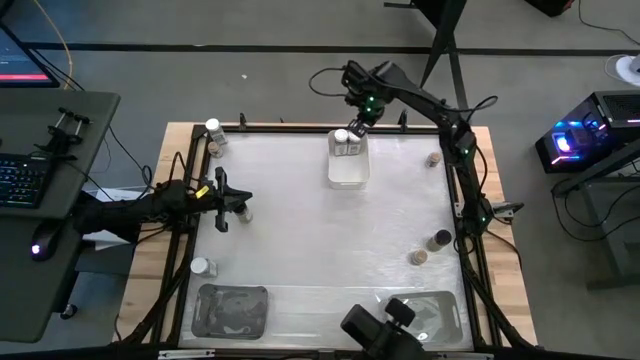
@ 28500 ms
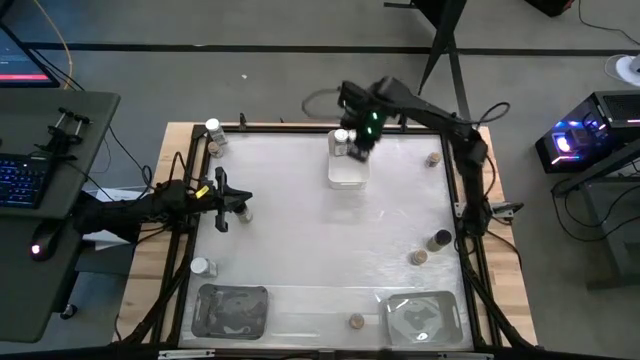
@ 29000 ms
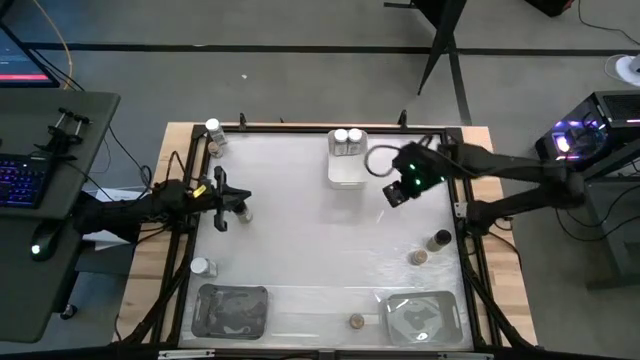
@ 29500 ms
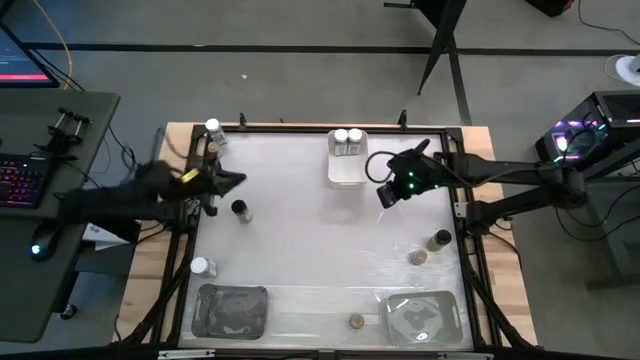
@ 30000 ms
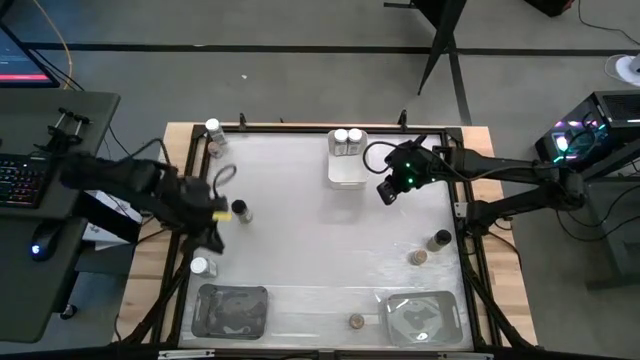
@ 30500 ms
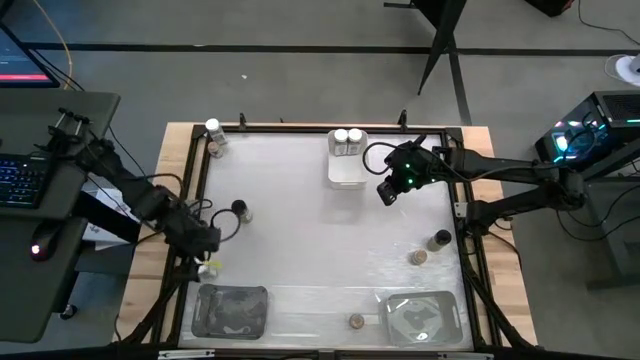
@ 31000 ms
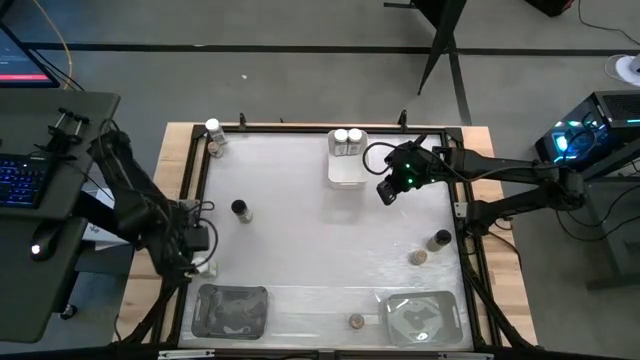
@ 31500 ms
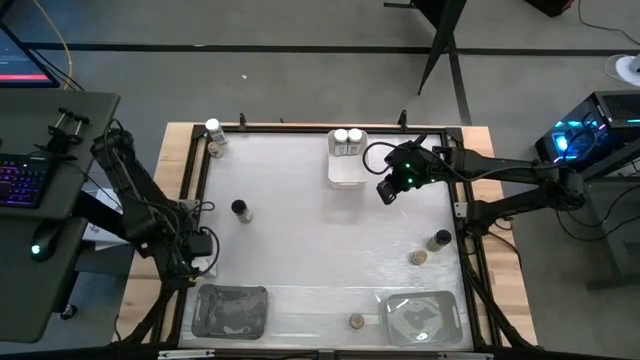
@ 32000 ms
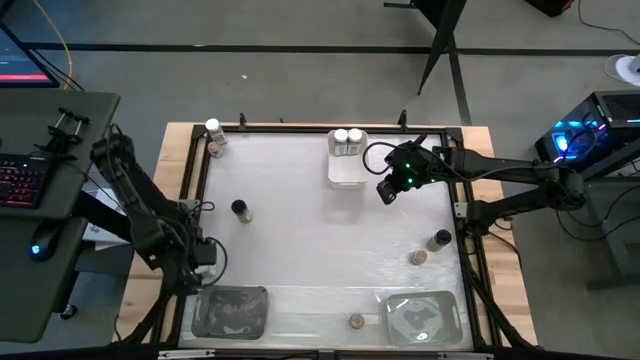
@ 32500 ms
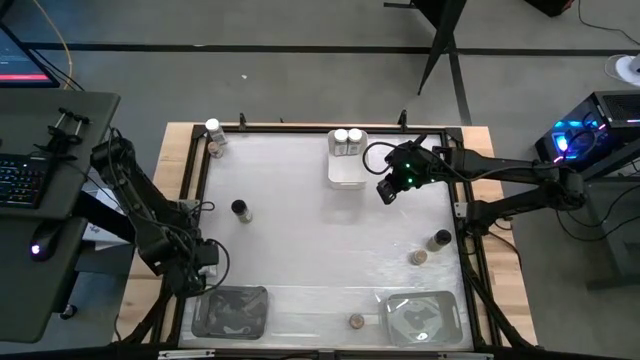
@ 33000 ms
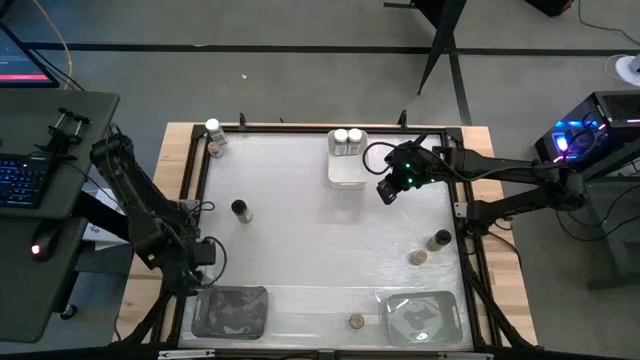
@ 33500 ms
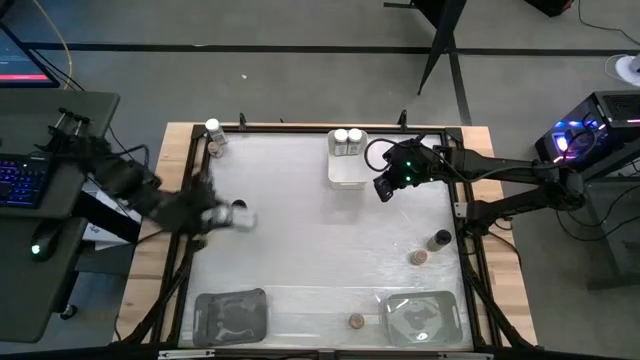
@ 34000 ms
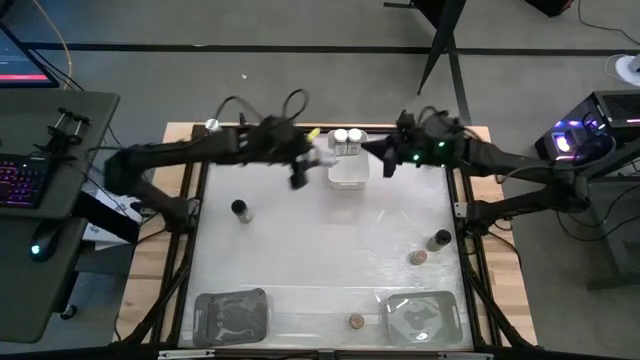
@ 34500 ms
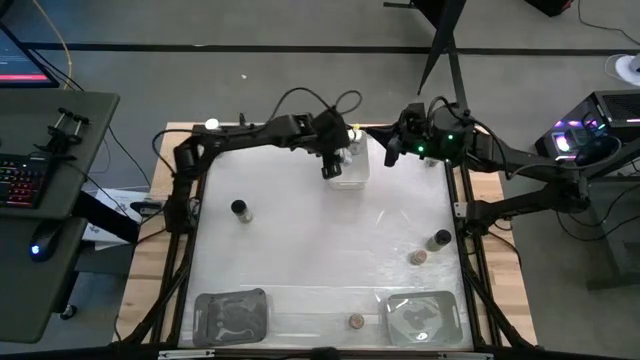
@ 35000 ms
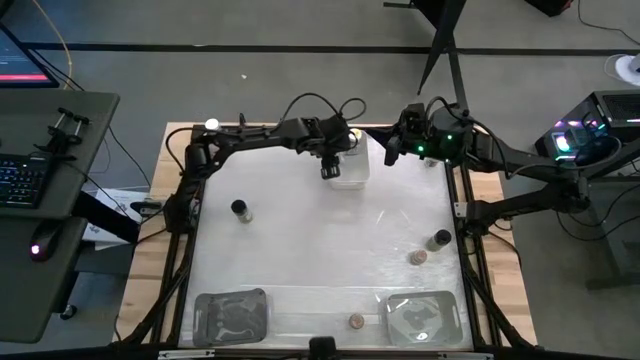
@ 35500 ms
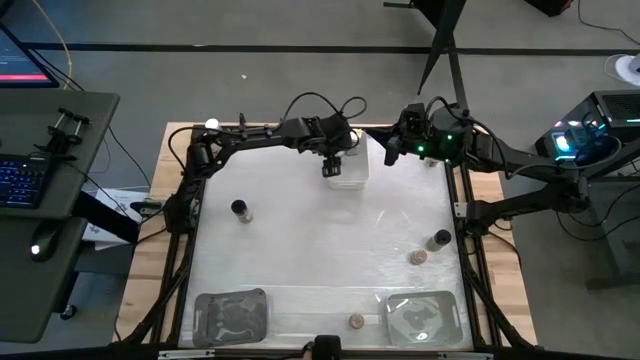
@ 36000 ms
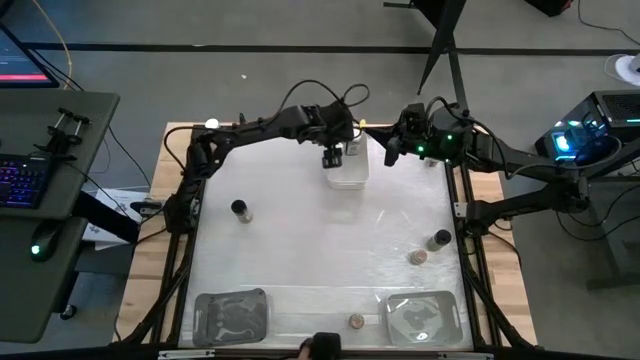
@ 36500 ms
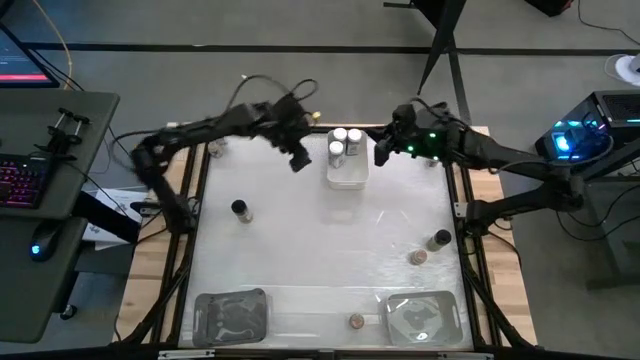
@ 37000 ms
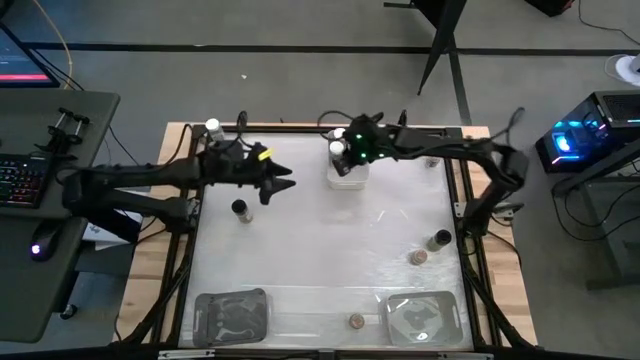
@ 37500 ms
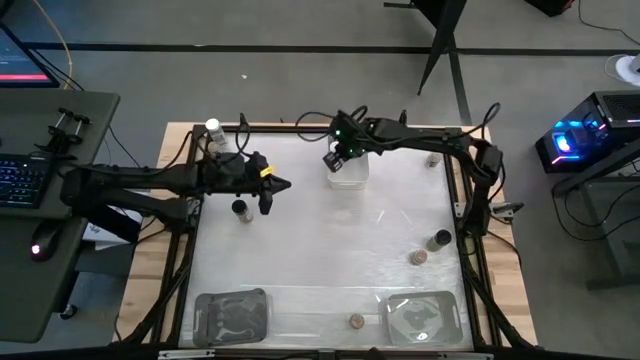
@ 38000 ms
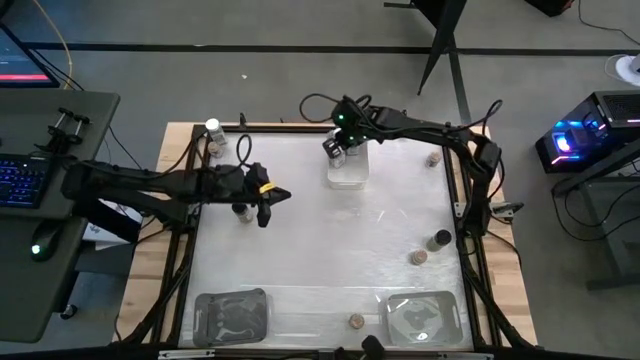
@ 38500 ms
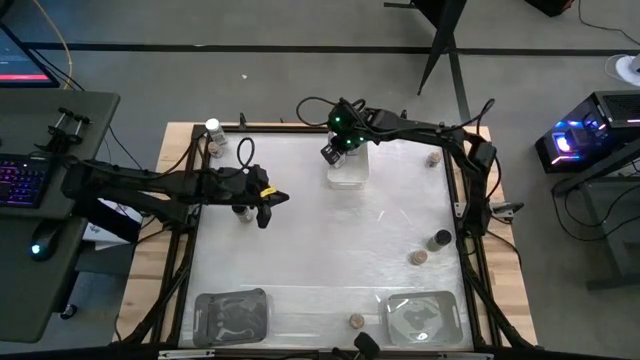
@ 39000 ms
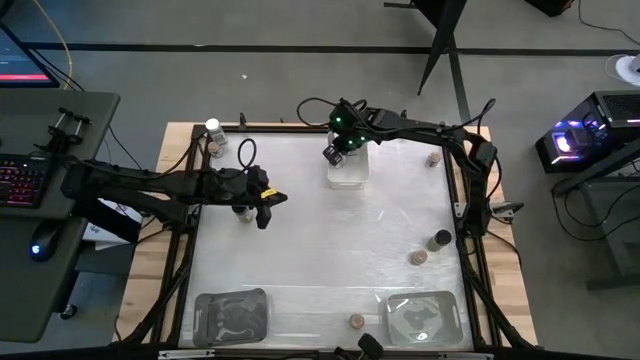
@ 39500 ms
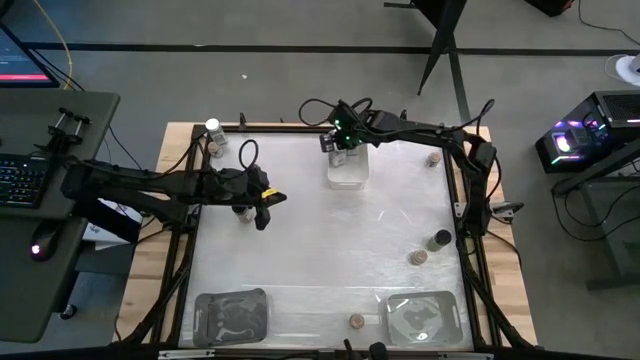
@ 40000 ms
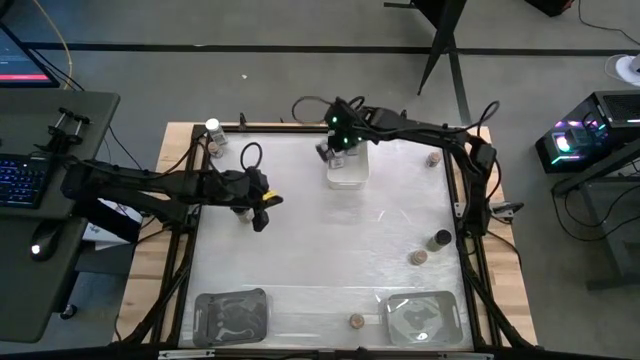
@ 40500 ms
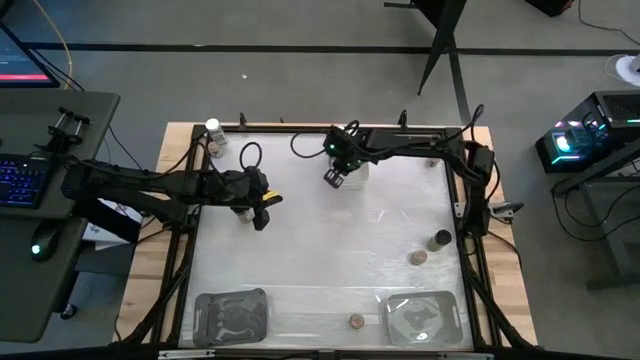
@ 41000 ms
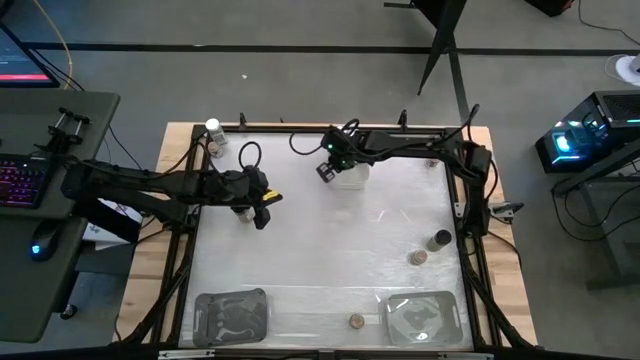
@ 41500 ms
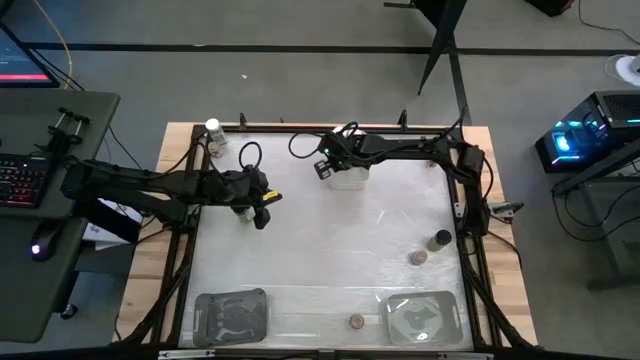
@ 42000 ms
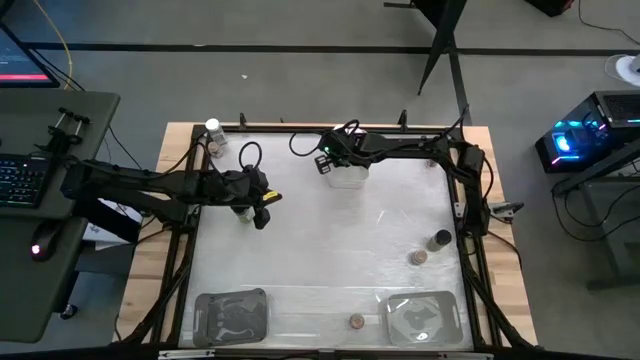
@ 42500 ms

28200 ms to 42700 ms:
Task: Sort spices by type
Put the bottom white seasoning bottle into the white bin

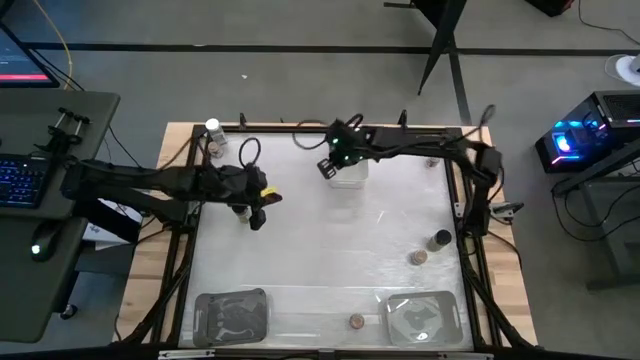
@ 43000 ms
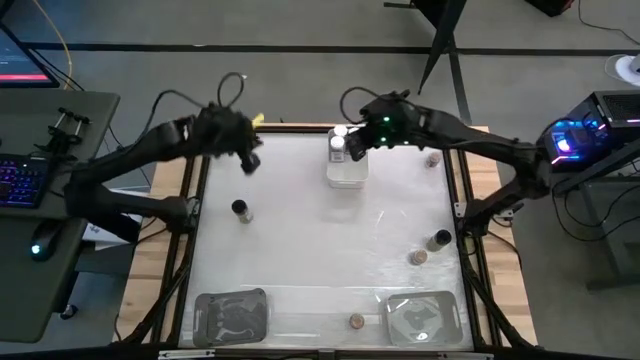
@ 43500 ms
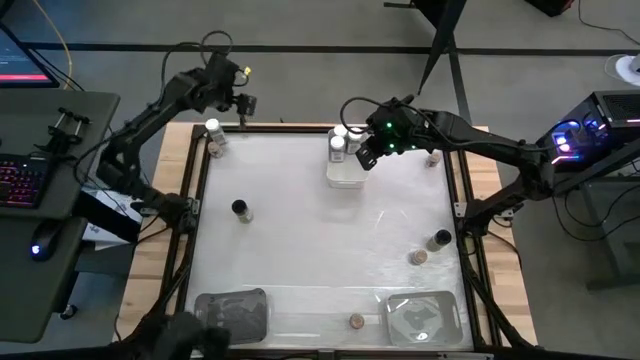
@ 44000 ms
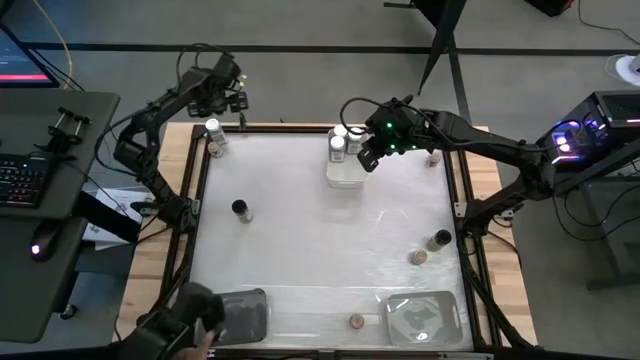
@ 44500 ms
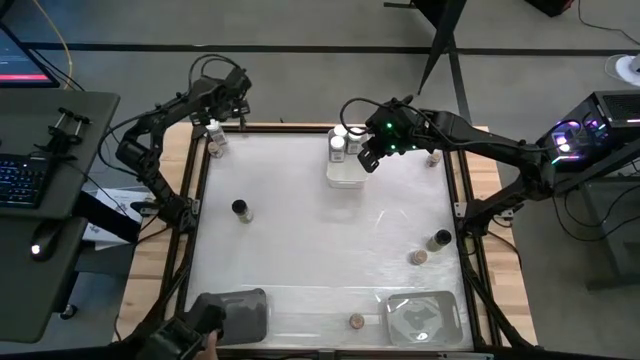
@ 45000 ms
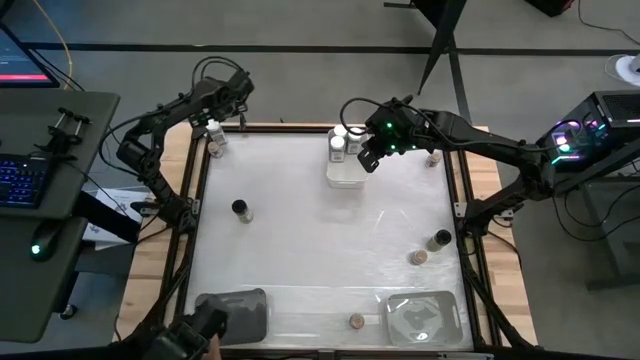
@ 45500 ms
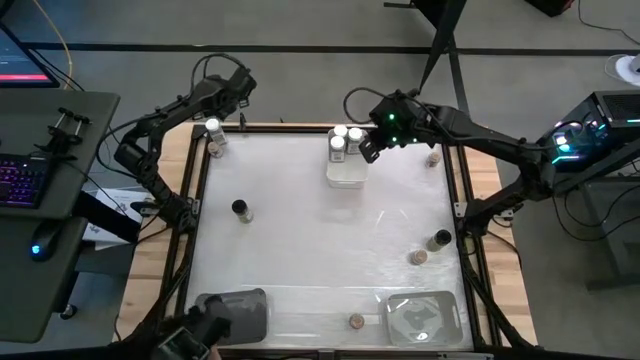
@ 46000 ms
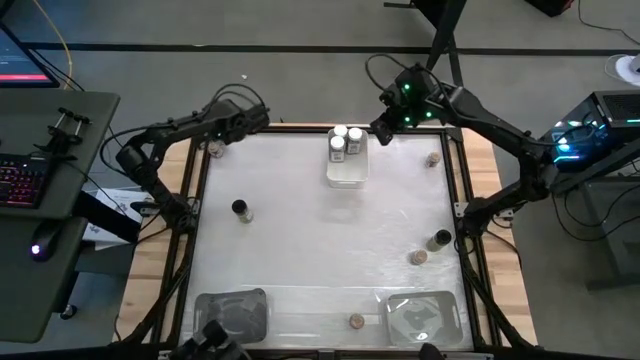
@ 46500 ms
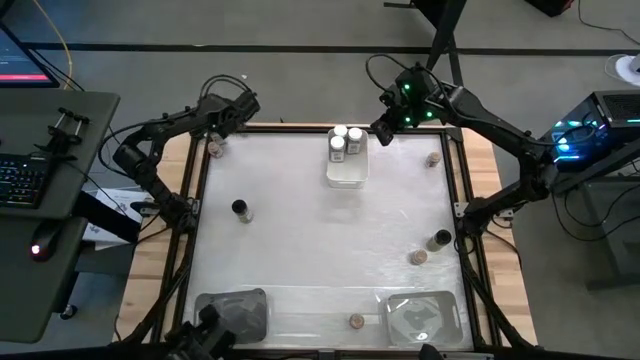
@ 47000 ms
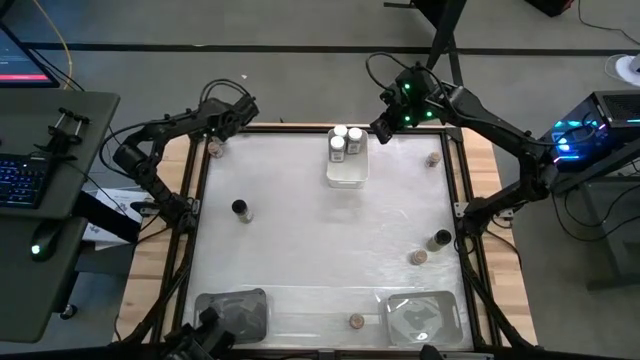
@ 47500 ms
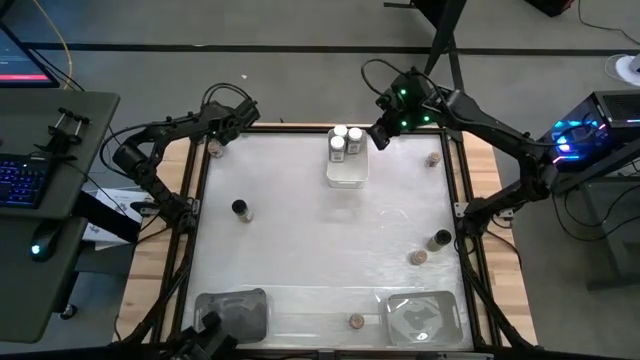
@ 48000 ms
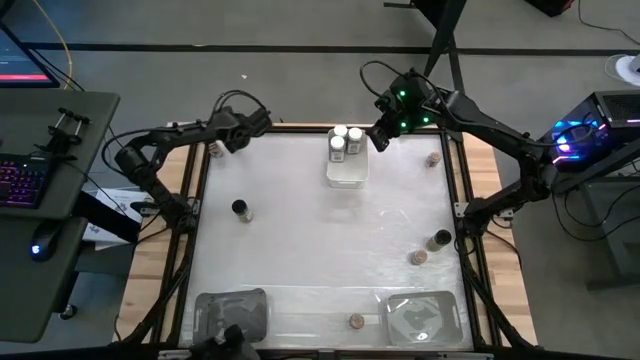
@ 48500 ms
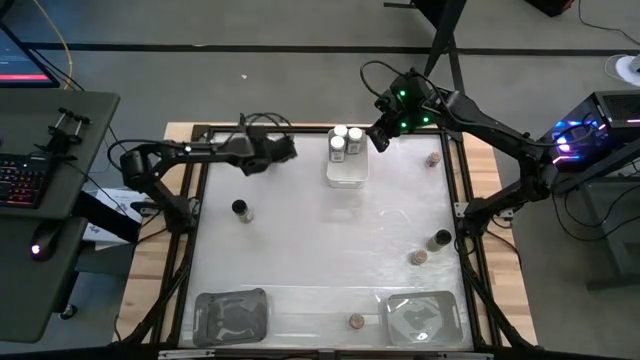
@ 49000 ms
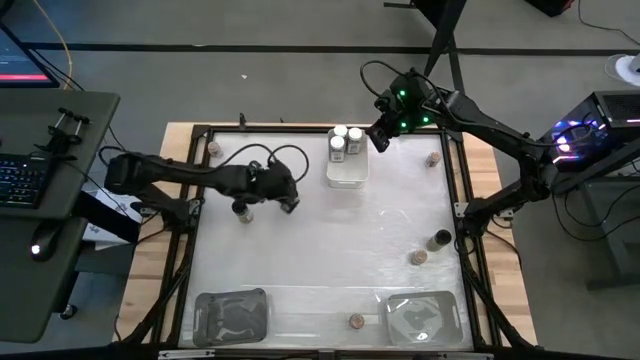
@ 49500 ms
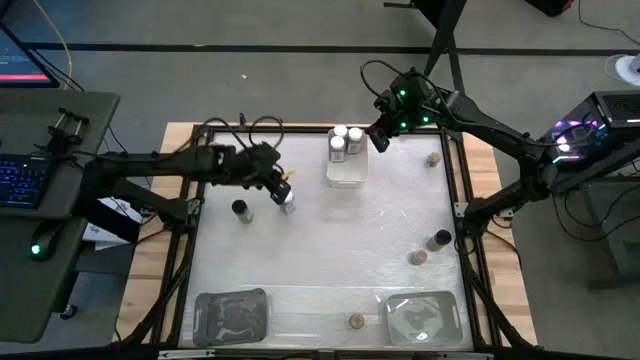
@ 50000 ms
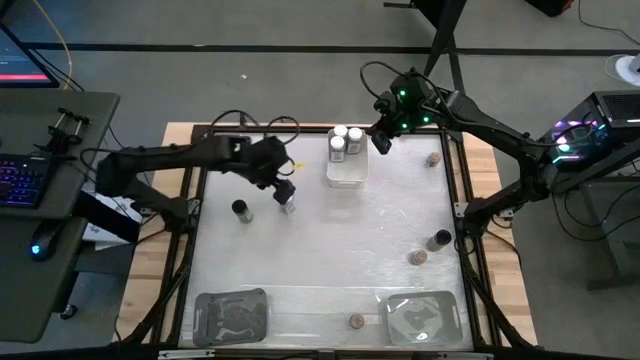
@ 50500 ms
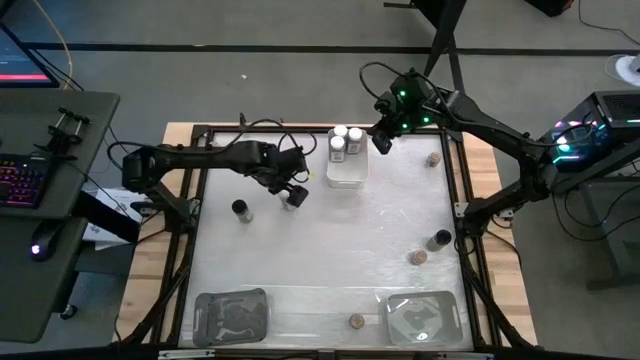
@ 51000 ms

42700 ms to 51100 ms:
Put the white seasoning bottle into the white bin
